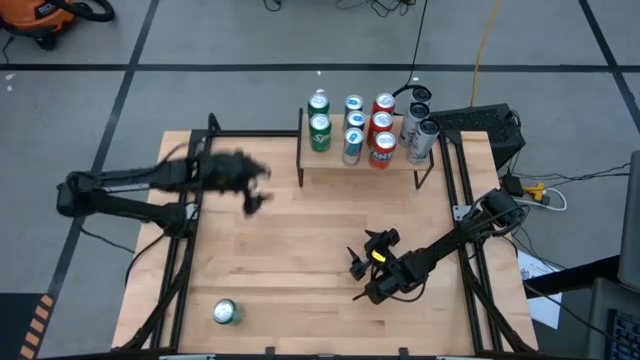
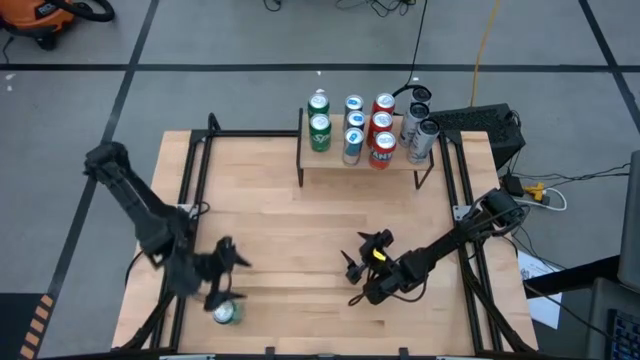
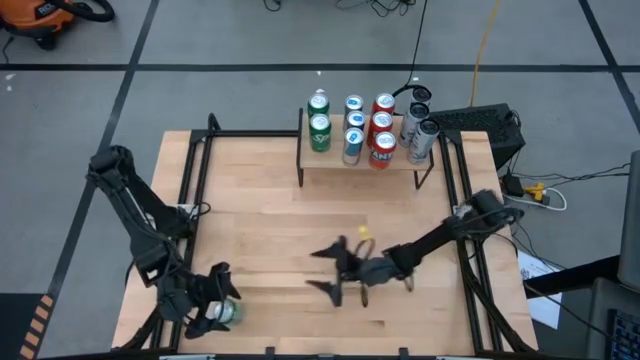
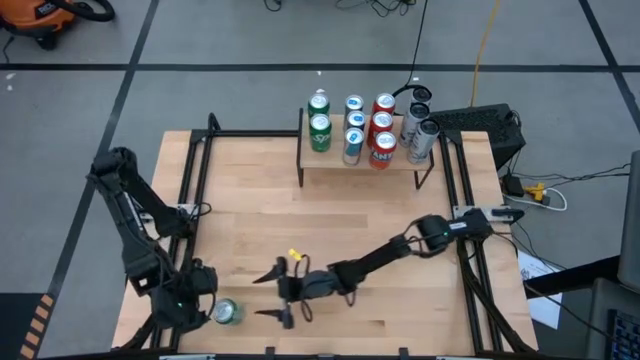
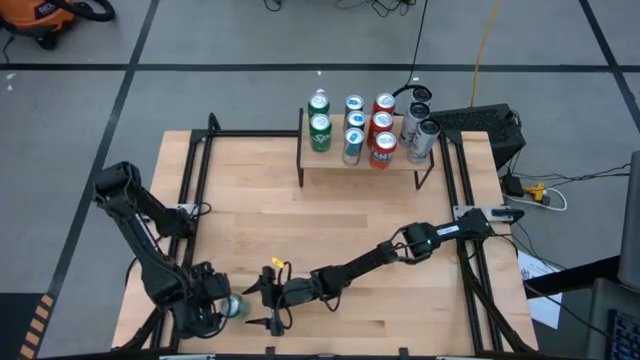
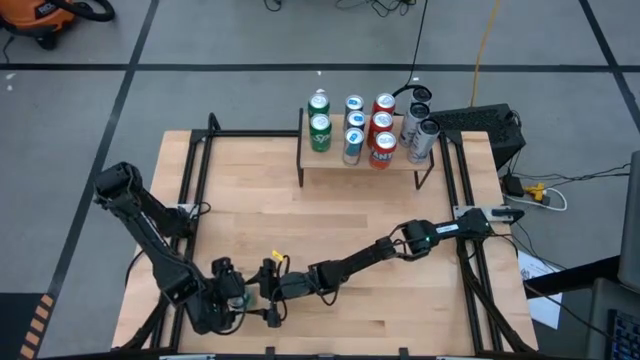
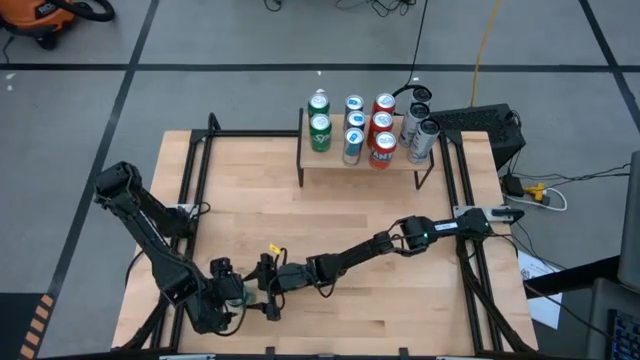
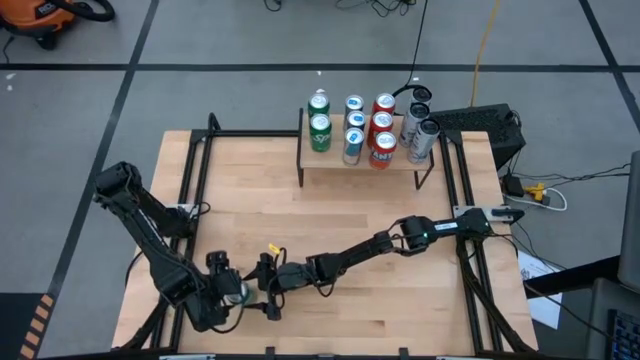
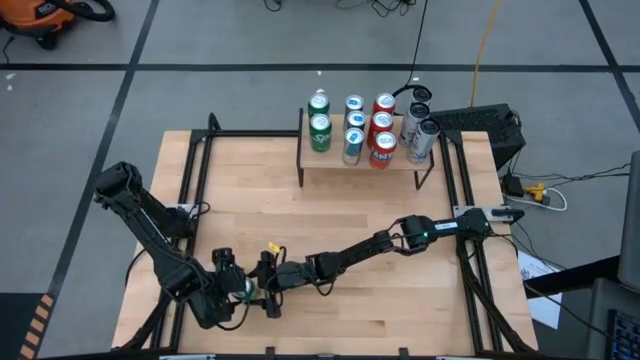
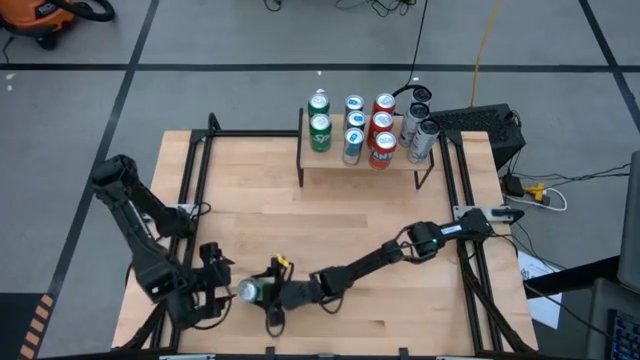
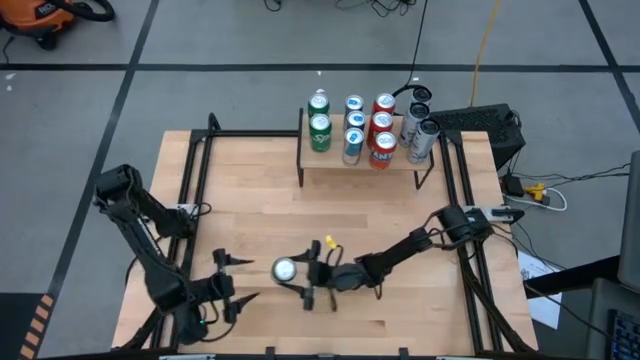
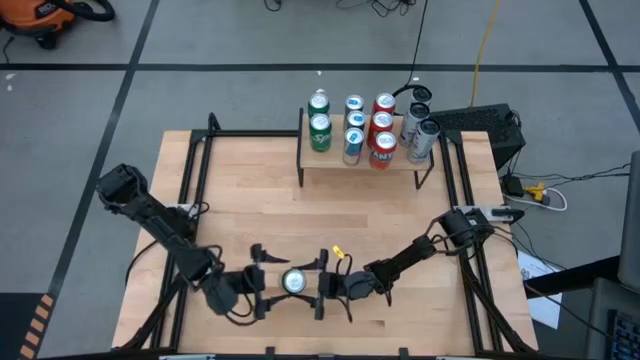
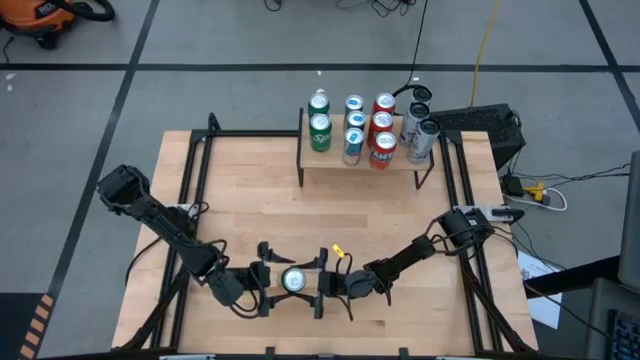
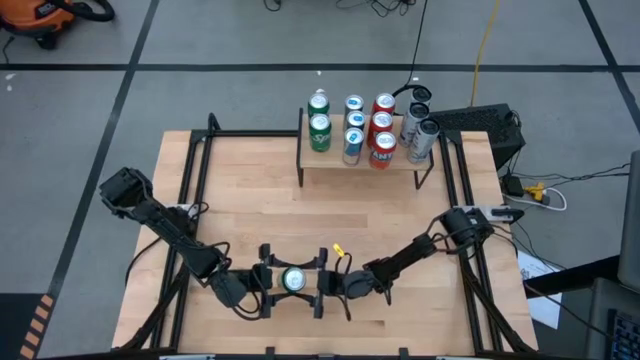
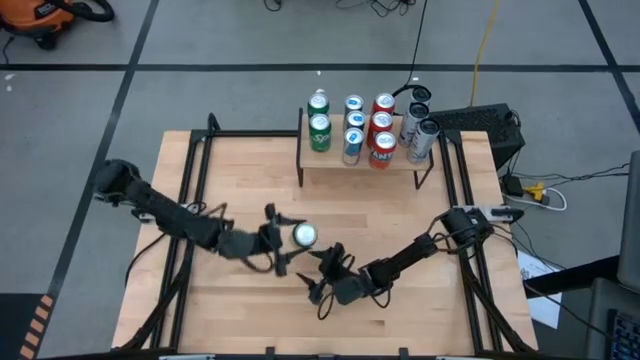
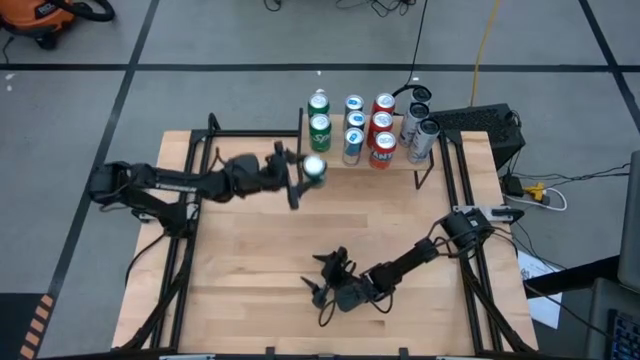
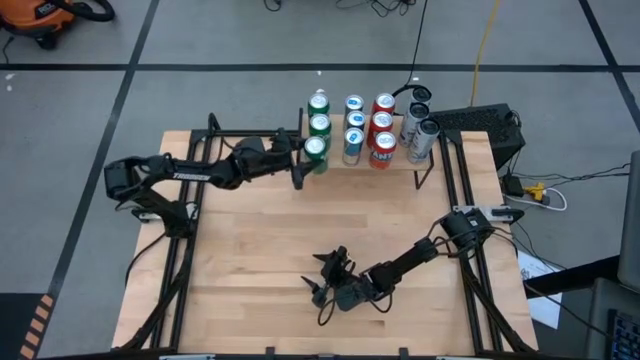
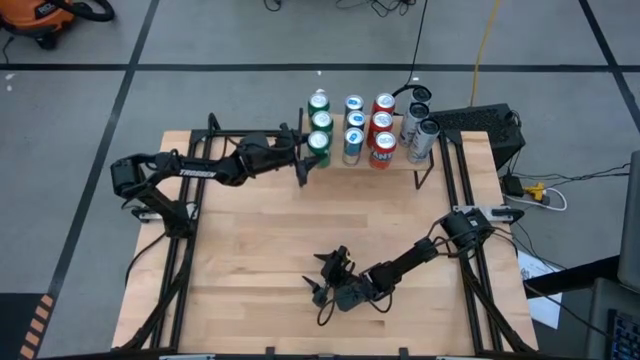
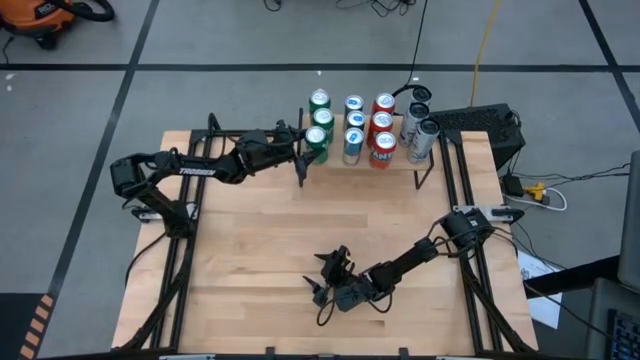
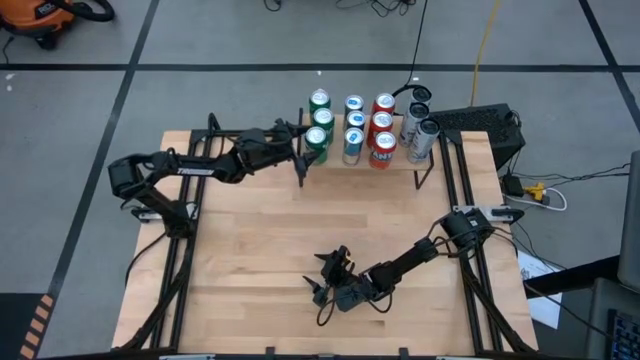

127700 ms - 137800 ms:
Task: Place canned beverage on shelf
Put the green soda can on the shelf aligned with the other green soda can

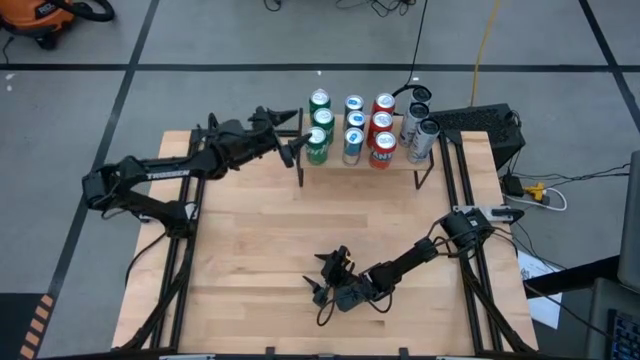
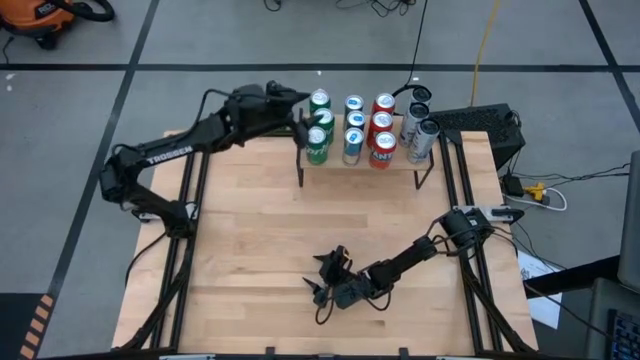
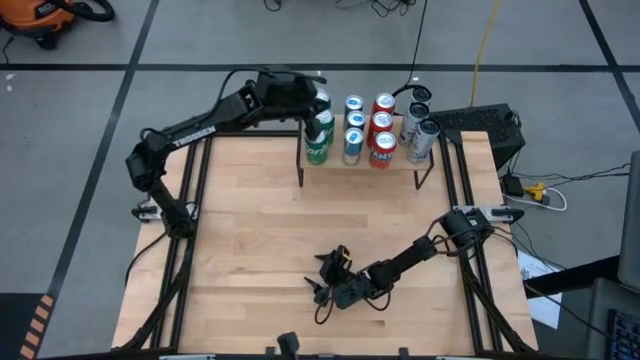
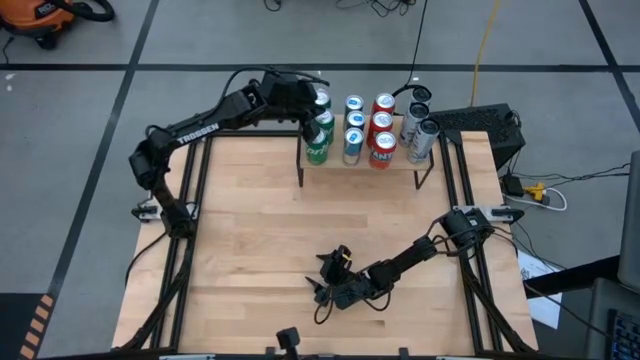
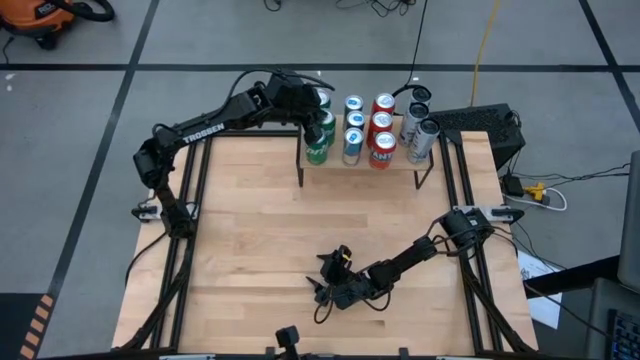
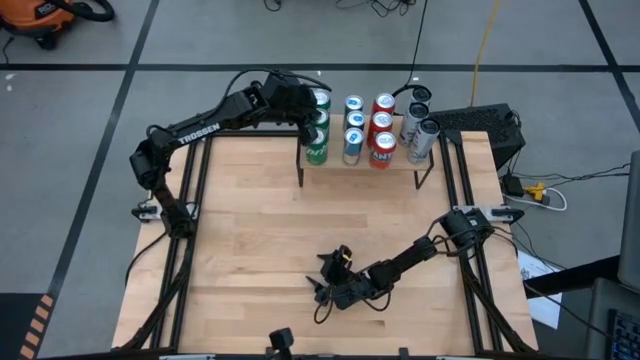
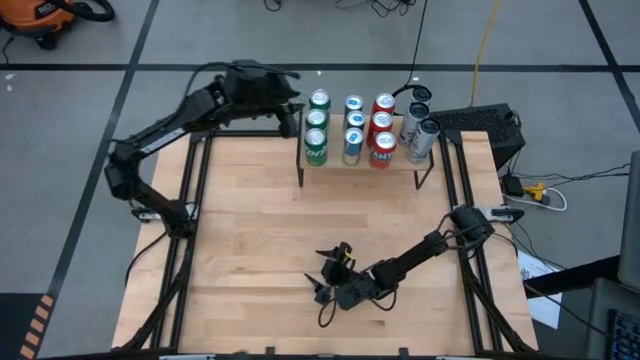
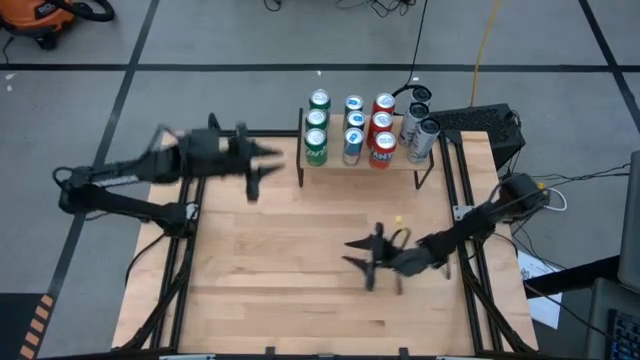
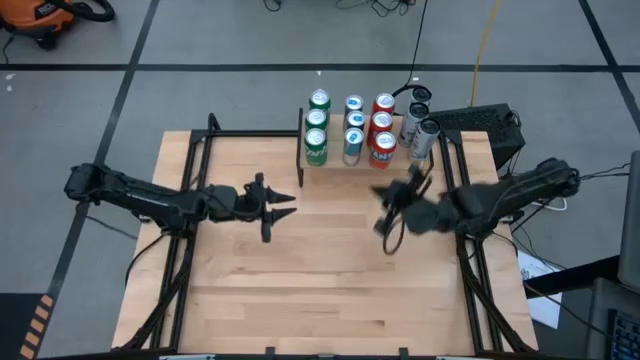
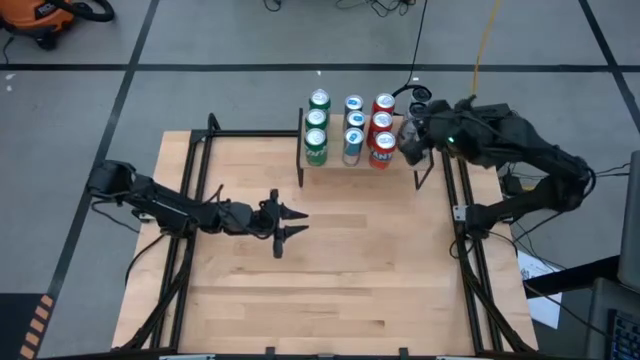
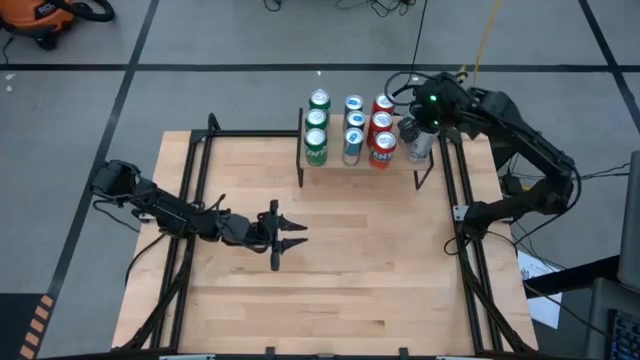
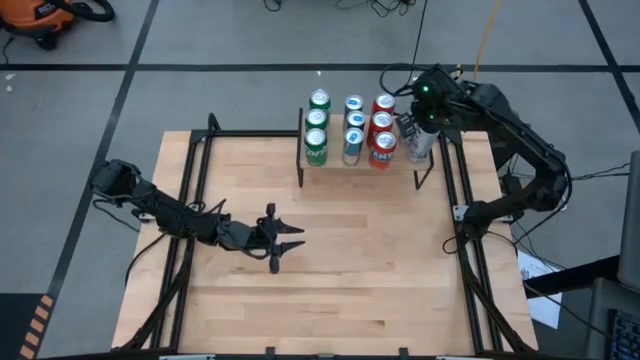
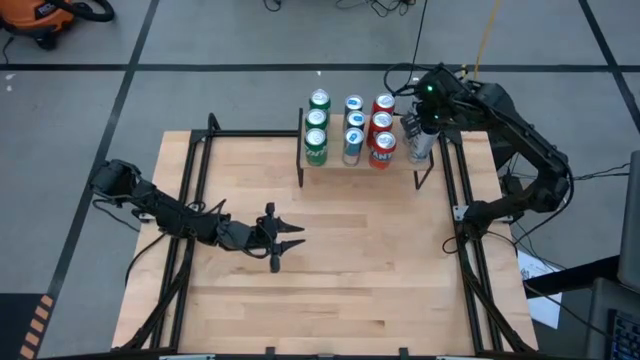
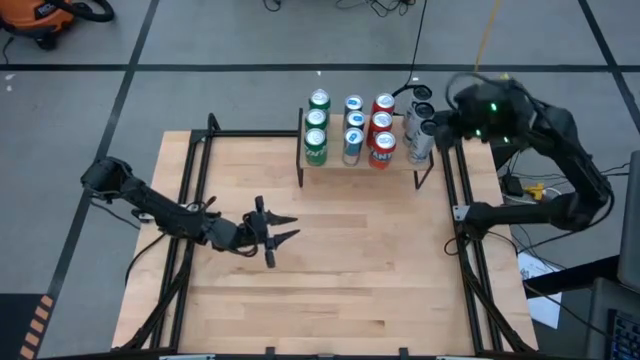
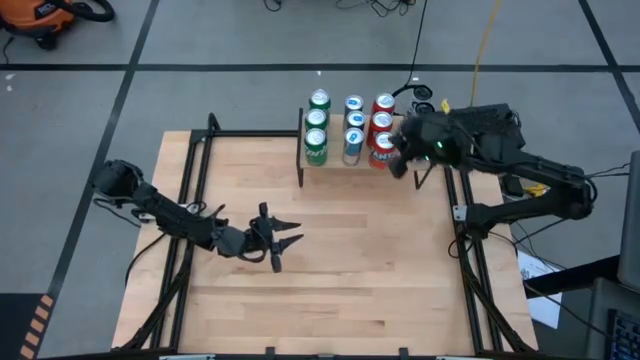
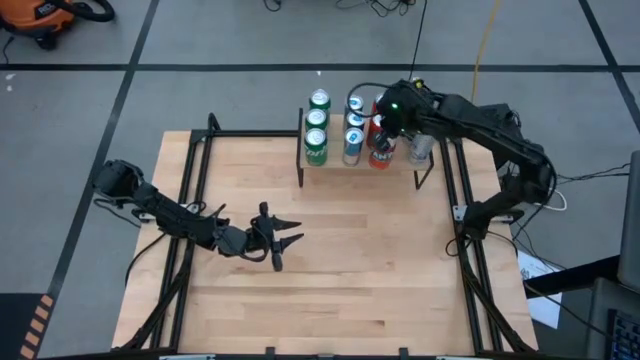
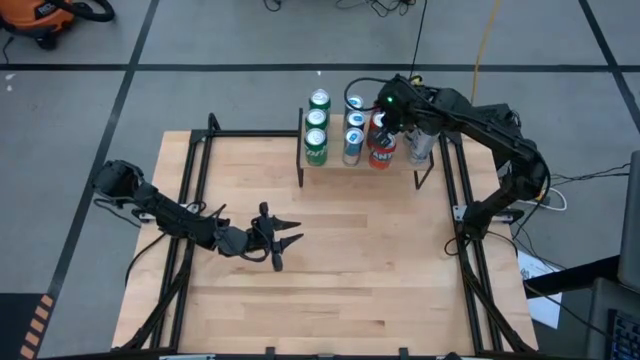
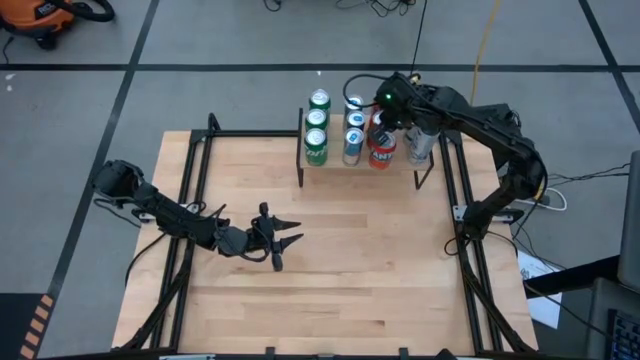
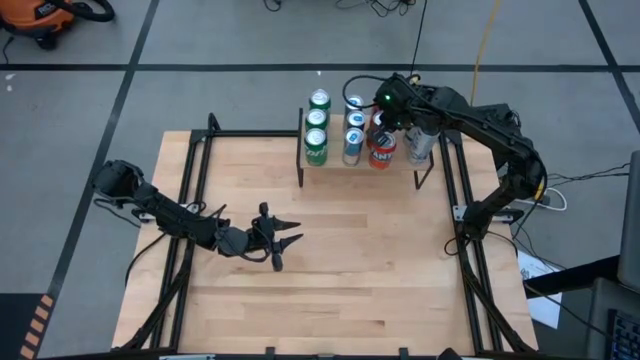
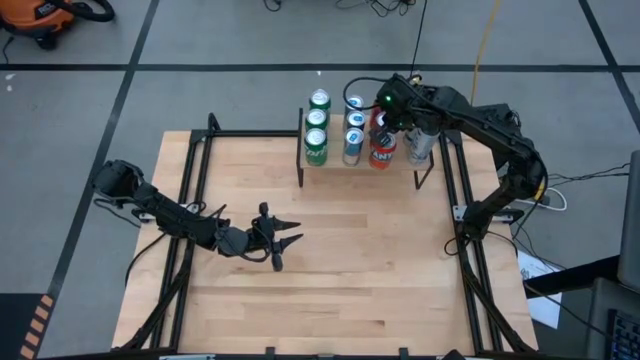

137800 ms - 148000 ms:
Adjust the soda cans on the shelf

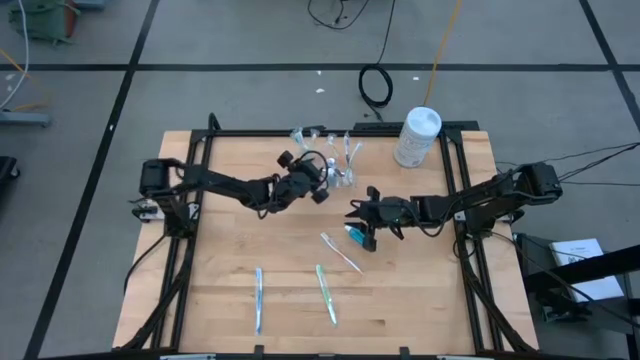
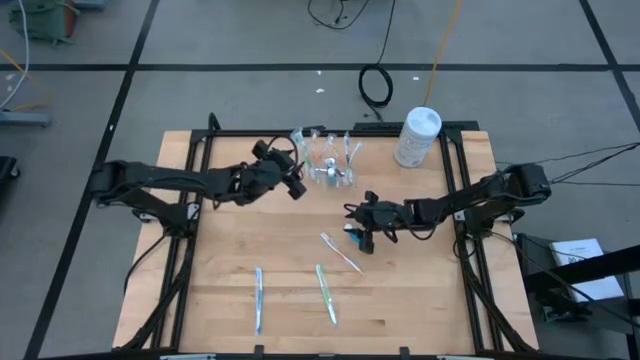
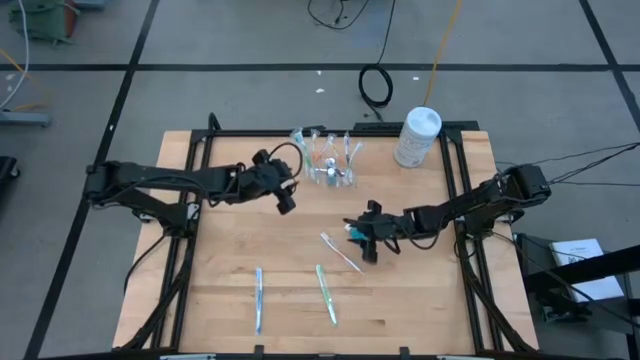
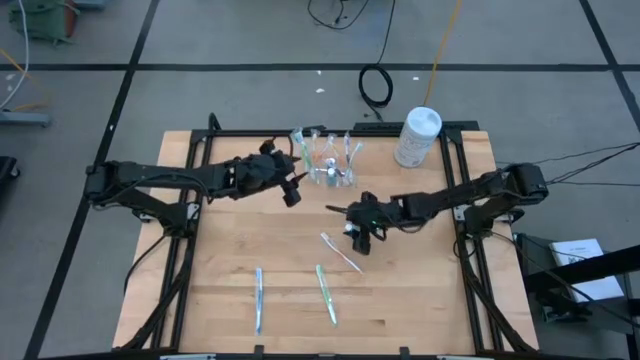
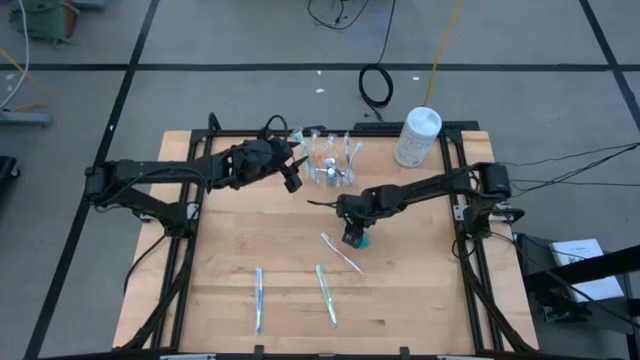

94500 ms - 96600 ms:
Task: Pick & Place toothbrushing station
Put the blue mouthwash into the transparent organizer
